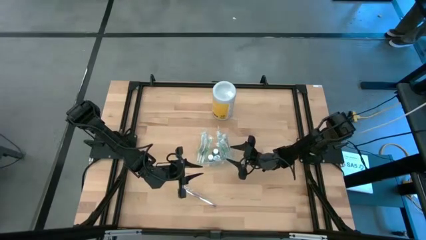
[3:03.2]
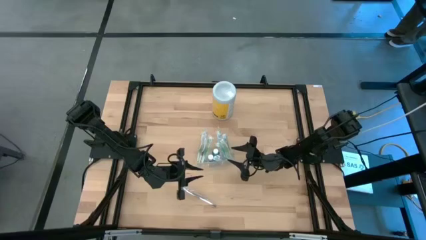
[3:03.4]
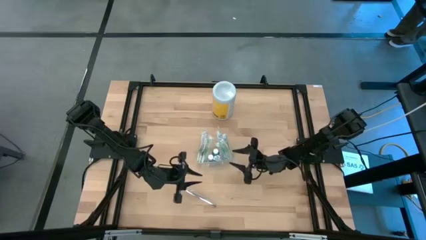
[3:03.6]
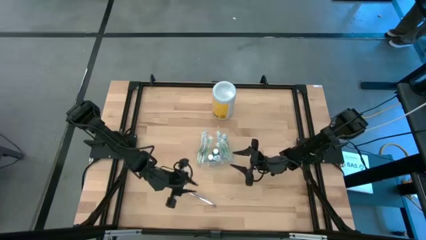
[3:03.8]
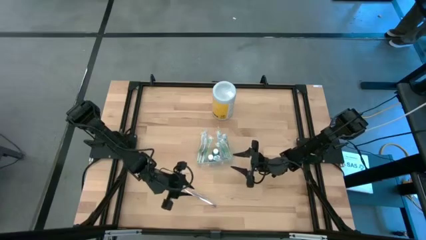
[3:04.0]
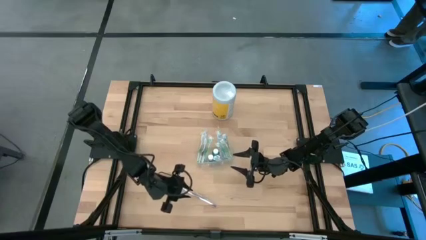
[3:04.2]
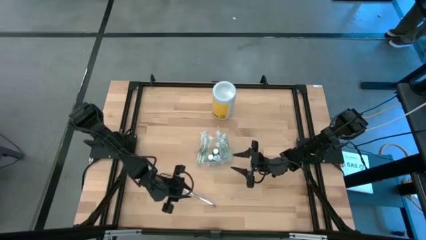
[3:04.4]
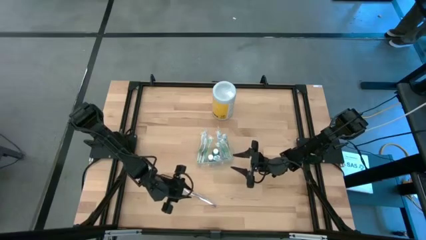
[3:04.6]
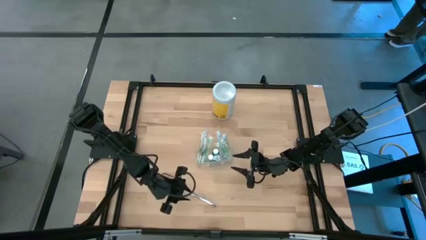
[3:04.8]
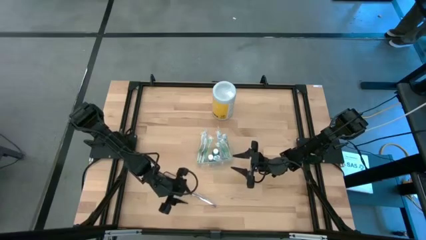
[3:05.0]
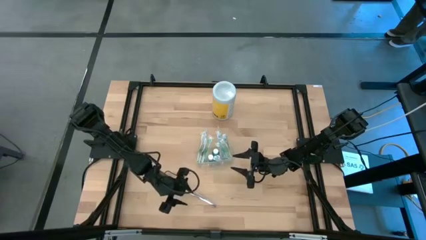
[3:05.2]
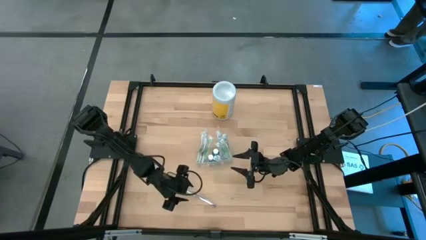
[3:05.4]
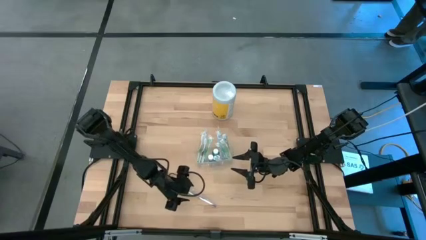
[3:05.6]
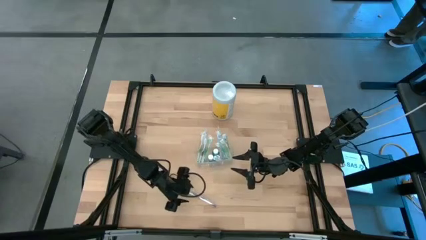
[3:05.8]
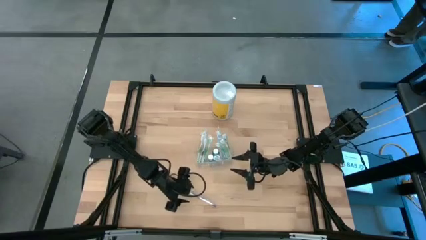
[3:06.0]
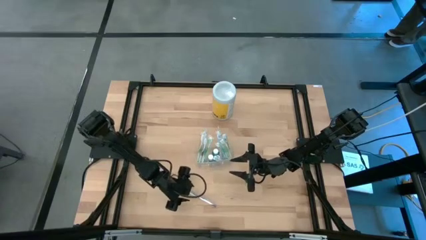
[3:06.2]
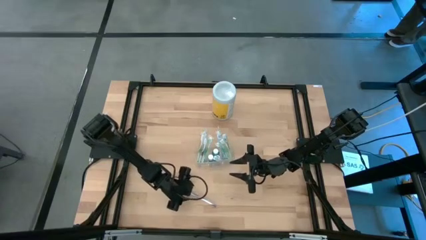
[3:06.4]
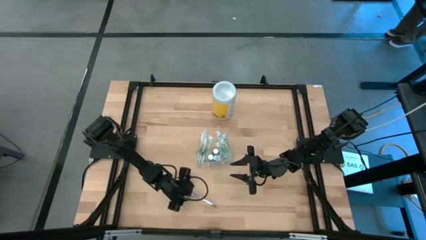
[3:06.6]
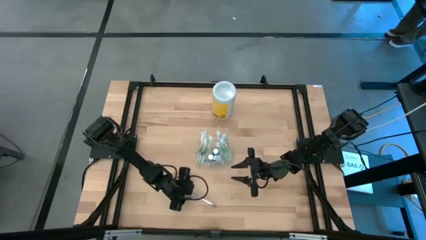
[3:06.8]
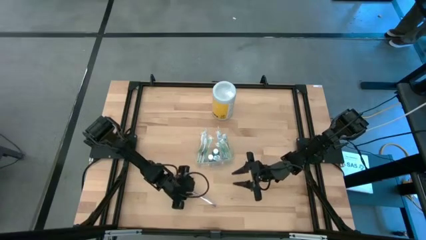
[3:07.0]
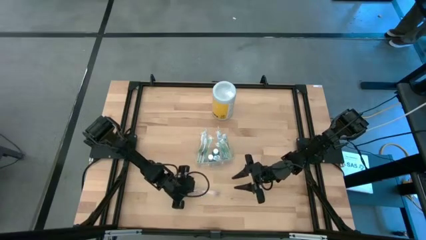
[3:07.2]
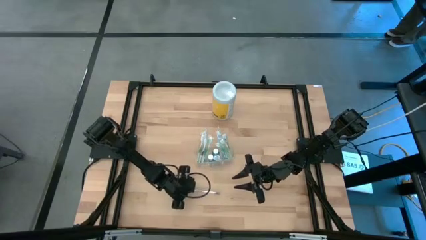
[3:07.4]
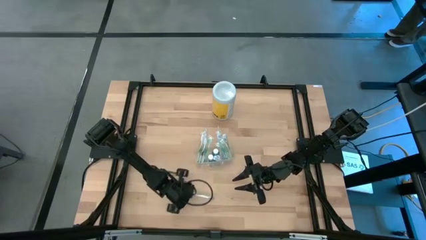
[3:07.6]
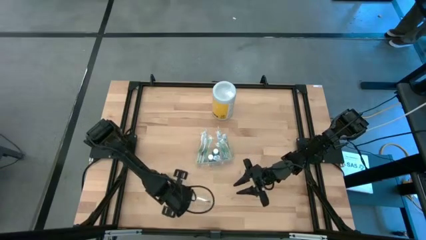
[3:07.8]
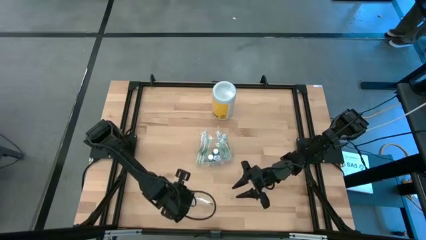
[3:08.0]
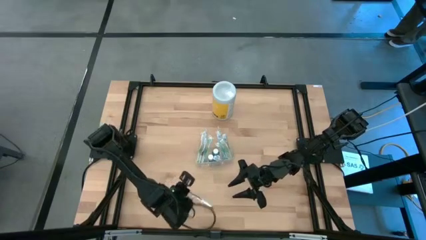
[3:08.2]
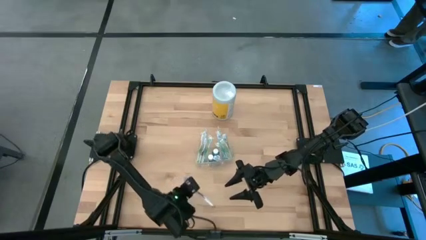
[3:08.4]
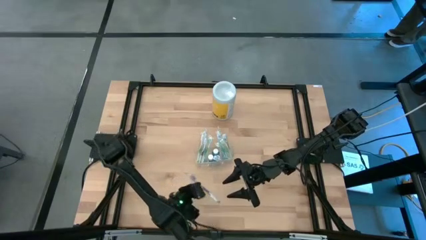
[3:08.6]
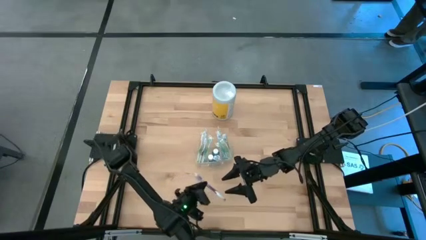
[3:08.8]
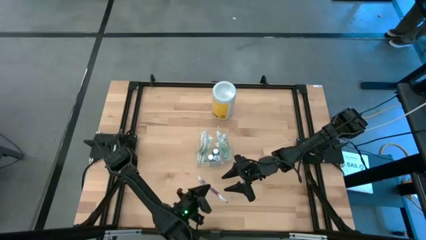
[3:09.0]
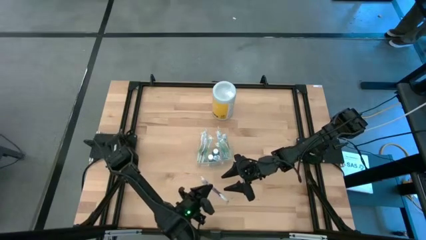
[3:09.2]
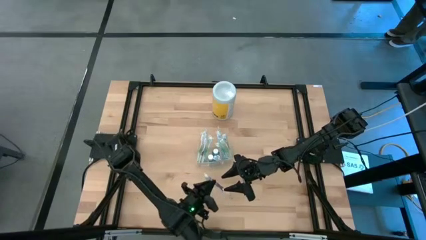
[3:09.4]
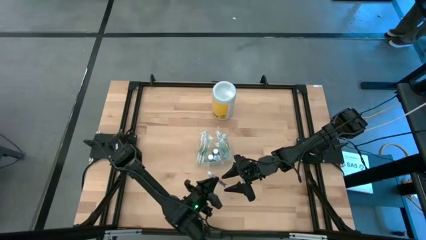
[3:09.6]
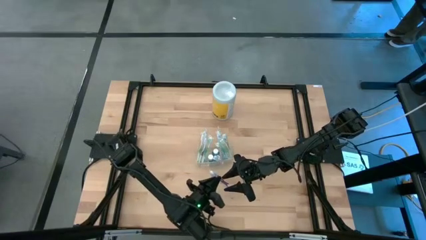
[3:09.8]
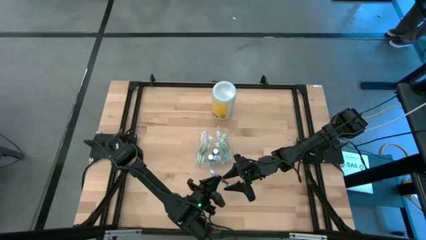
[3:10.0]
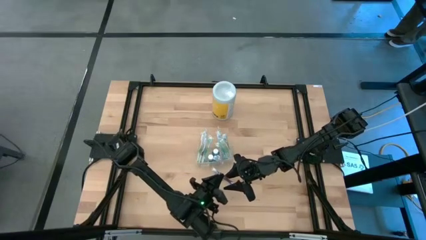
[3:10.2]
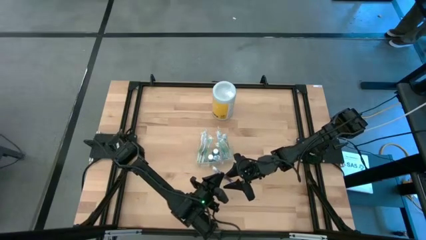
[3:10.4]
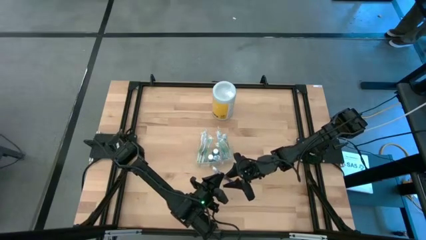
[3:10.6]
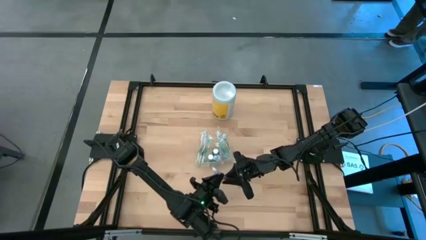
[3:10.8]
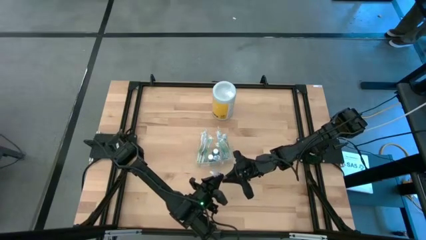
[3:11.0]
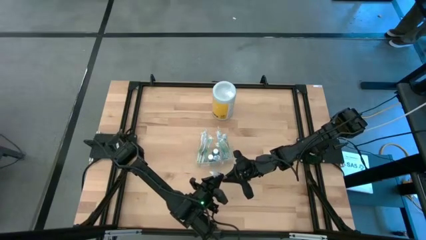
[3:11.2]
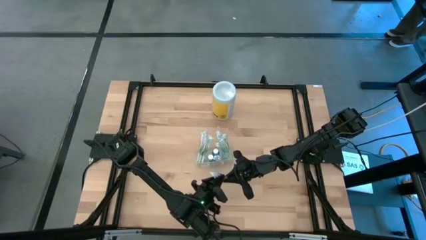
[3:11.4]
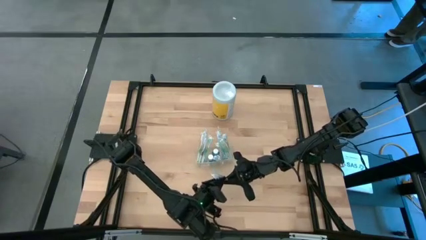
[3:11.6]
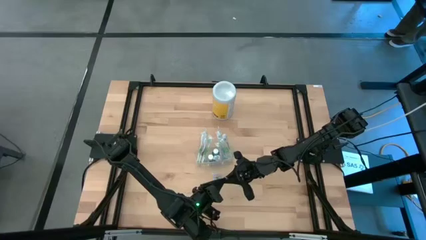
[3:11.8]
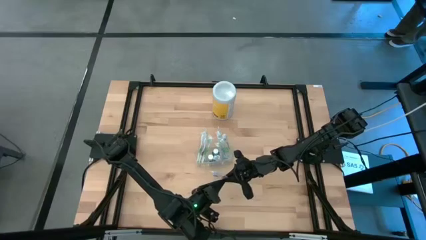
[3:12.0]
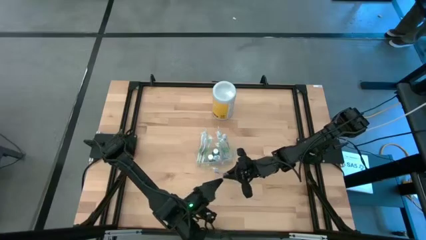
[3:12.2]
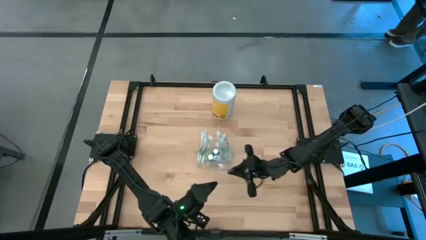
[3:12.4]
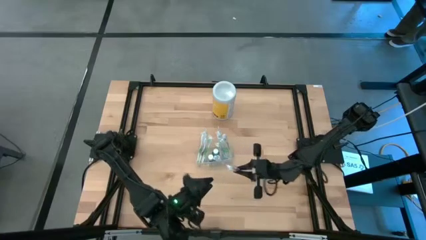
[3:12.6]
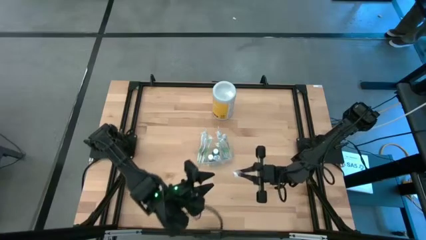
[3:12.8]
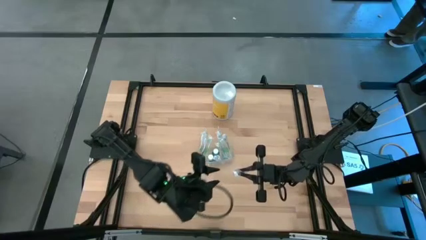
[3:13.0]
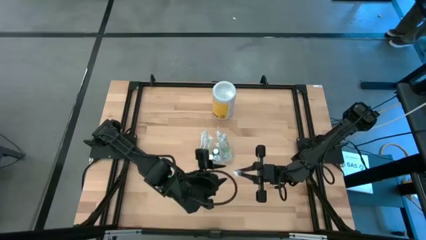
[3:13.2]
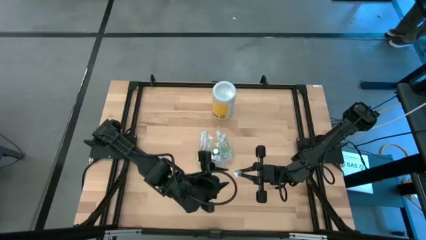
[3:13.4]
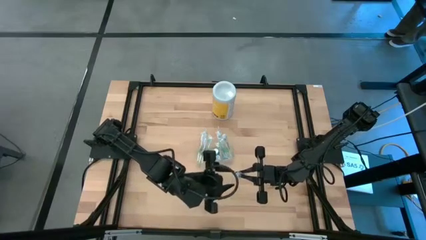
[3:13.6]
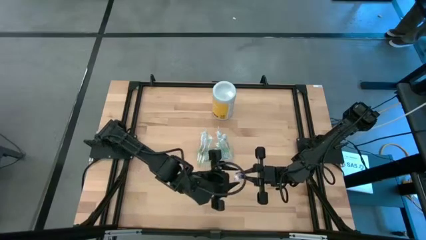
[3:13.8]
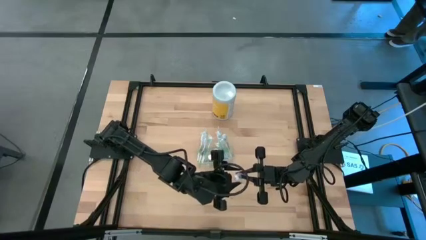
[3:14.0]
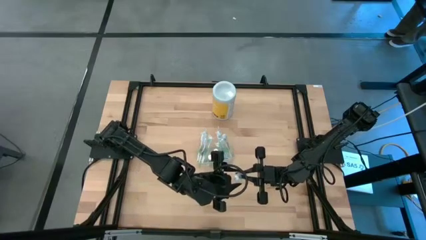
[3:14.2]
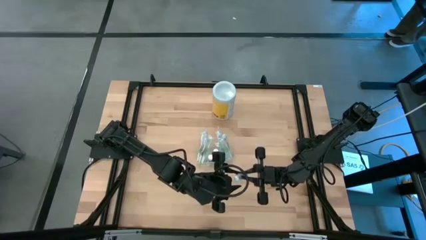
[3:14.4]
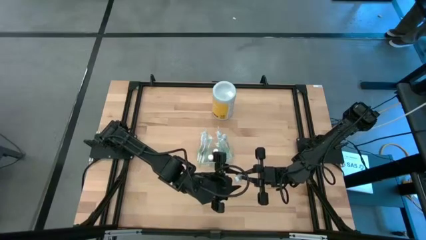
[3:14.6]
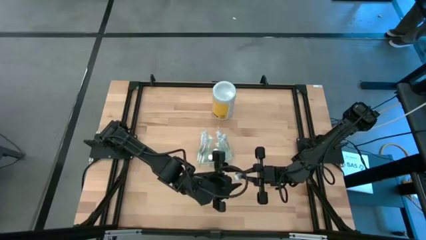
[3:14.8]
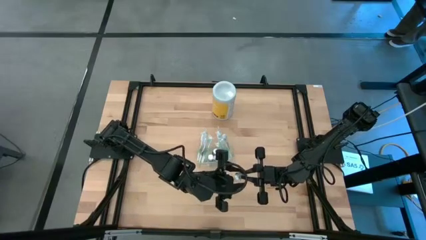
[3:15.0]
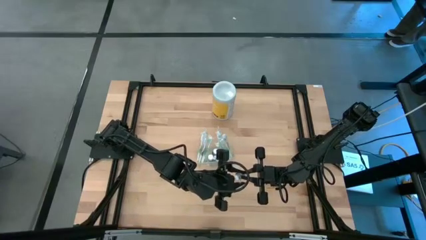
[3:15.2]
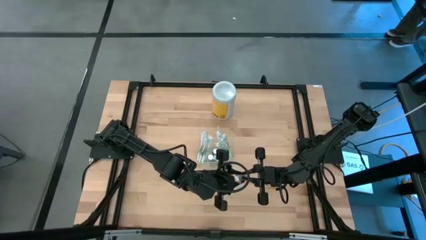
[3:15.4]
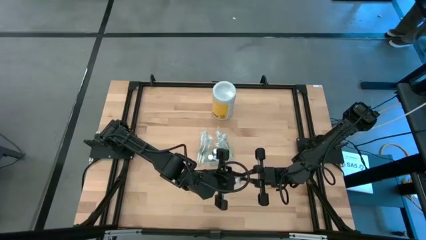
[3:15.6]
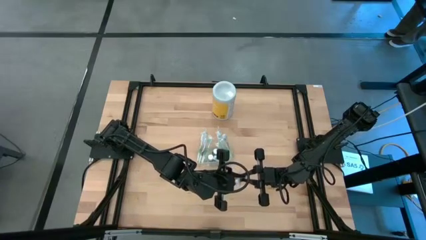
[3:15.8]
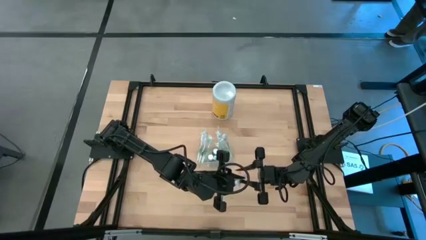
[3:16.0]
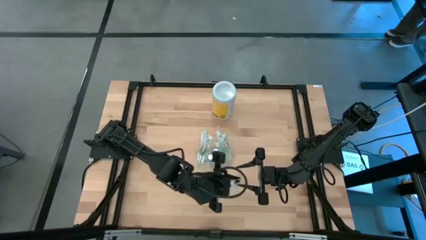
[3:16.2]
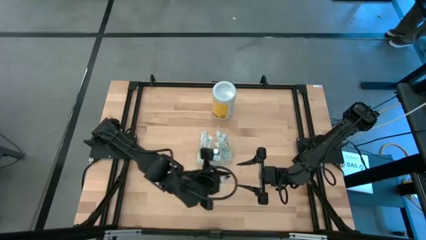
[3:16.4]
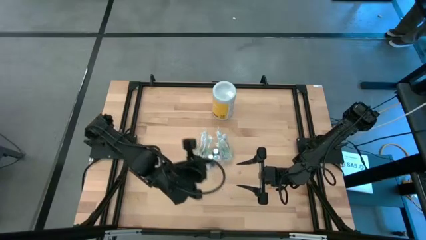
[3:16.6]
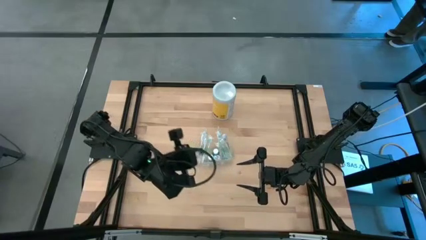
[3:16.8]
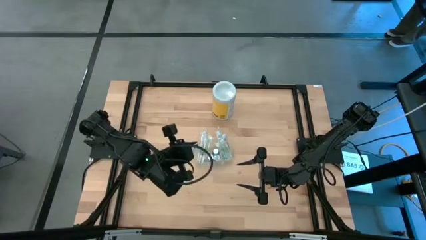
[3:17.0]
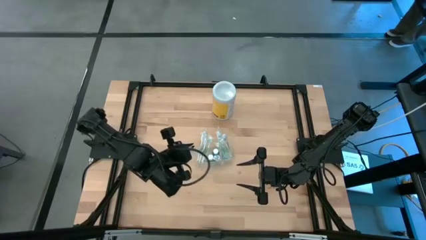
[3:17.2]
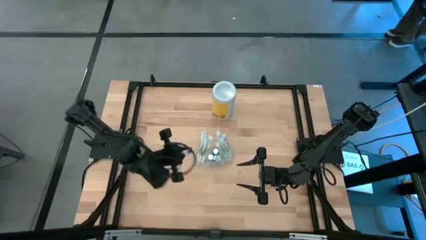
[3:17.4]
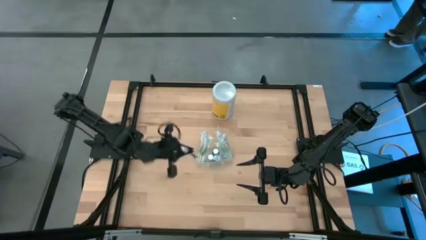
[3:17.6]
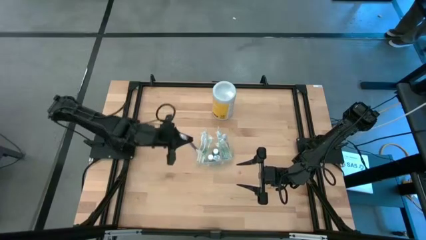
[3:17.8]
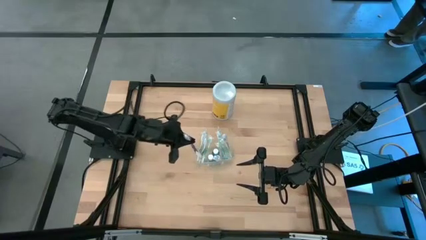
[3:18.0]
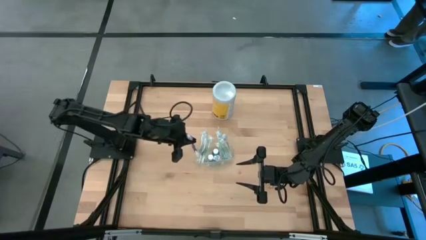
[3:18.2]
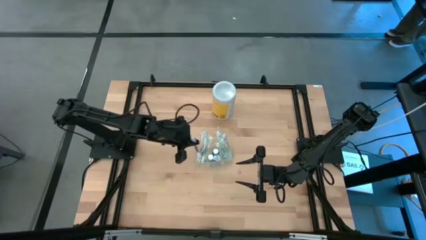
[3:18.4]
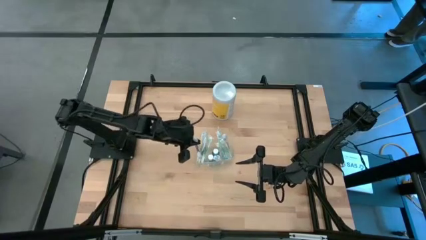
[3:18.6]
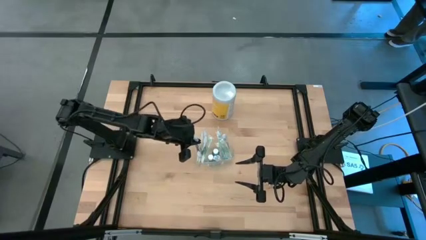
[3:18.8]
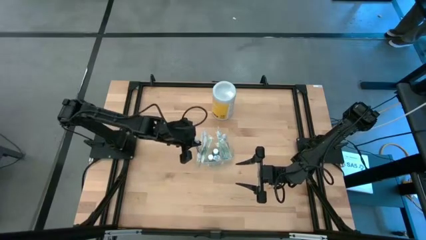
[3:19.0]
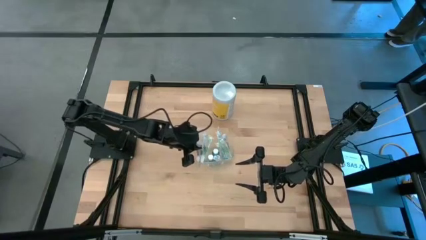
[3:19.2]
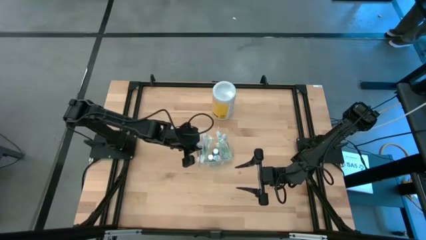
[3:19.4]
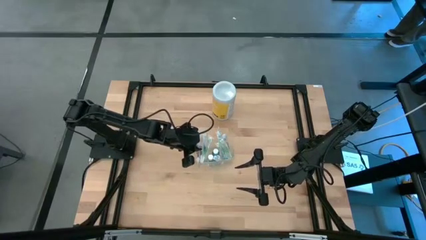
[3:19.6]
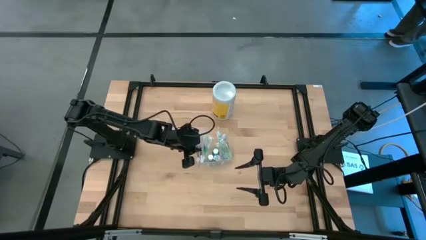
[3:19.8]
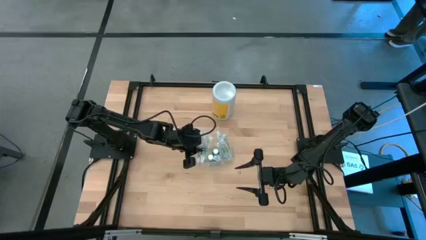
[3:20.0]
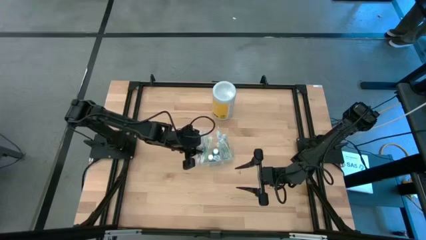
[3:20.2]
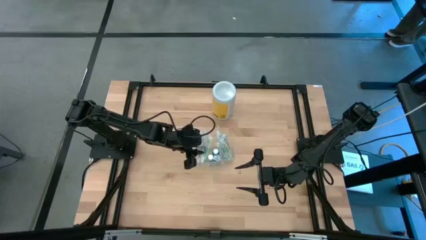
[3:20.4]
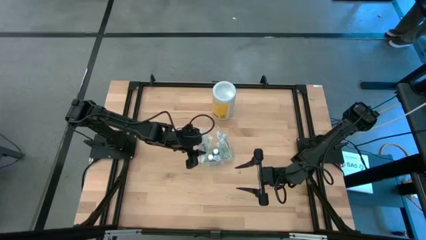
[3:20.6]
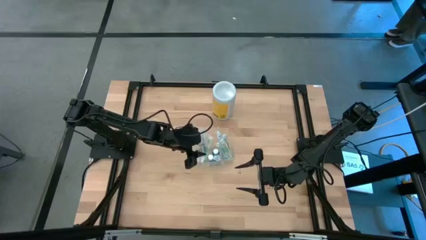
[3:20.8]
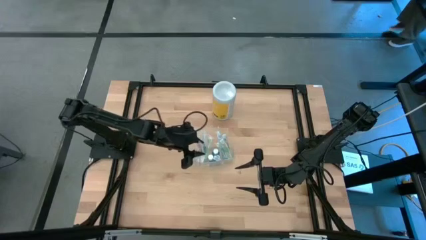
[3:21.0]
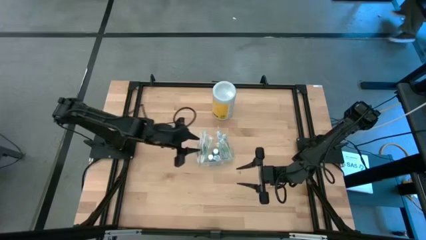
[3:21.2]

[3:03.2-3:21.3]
Task: Pick & Place toothbrushing station
Put the purple toothbrush into the transparent organizer
